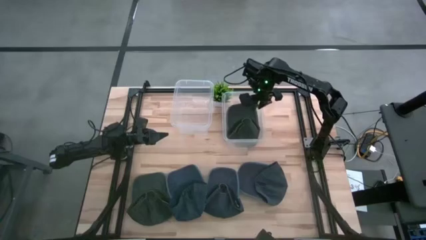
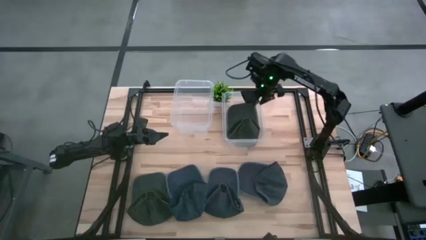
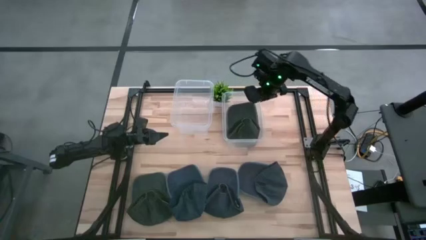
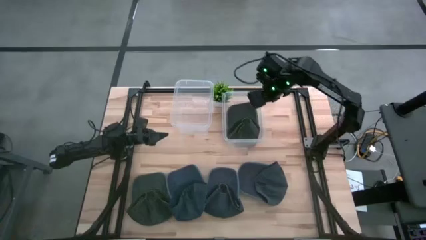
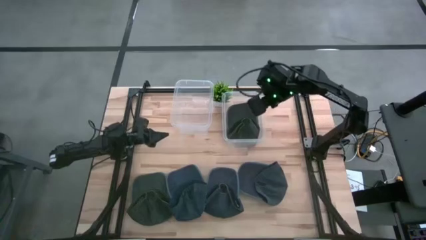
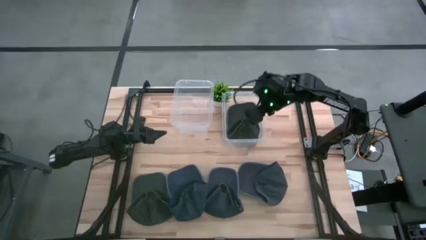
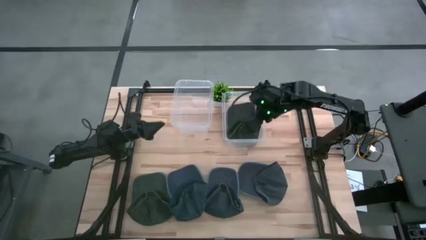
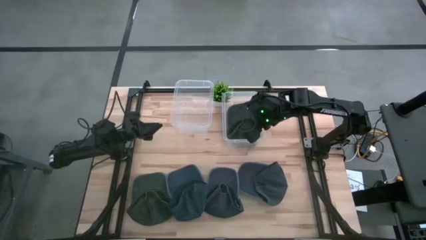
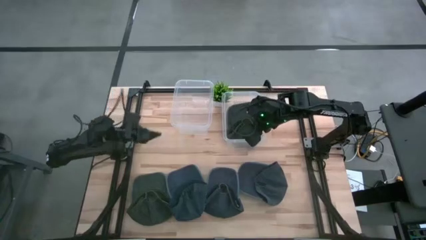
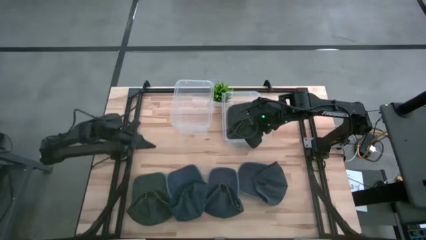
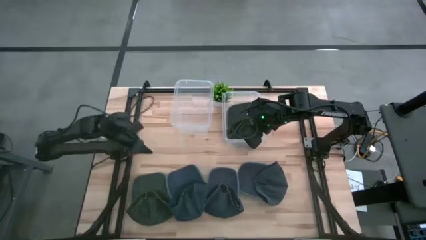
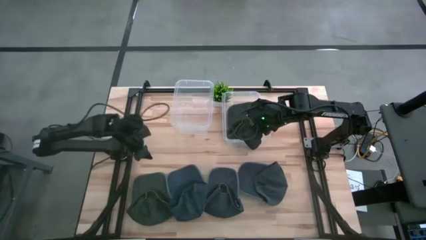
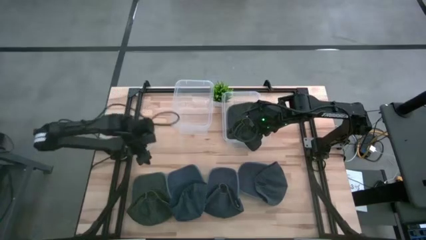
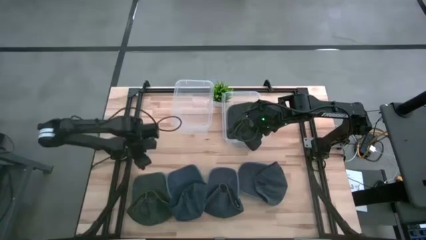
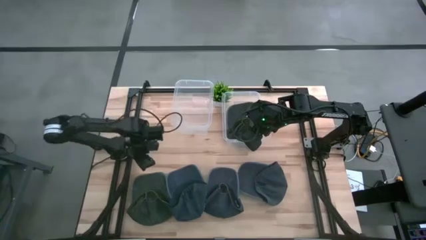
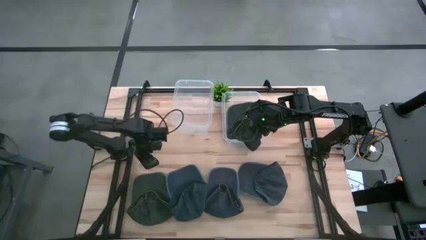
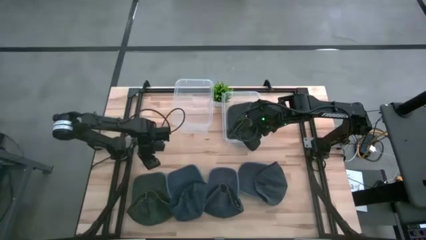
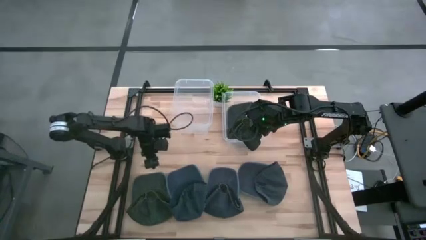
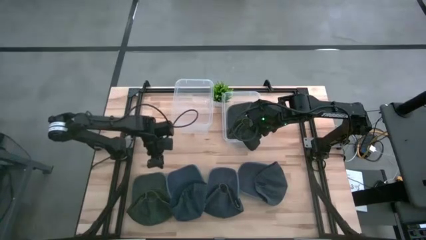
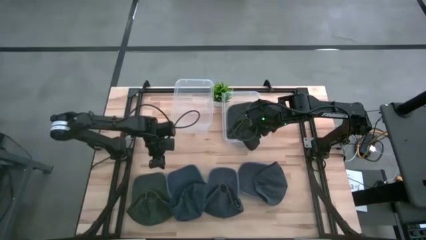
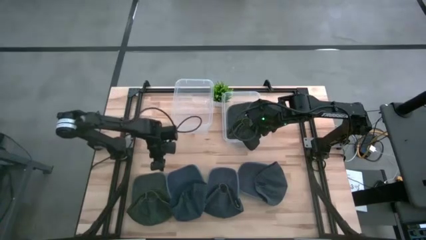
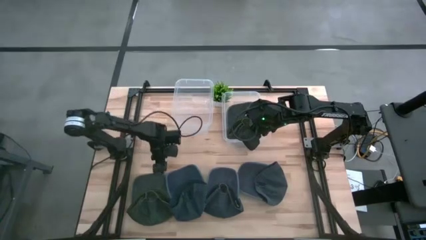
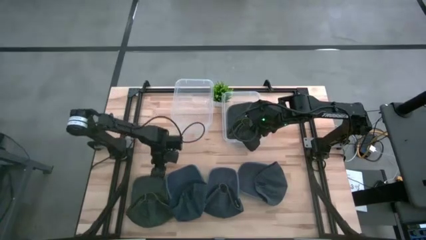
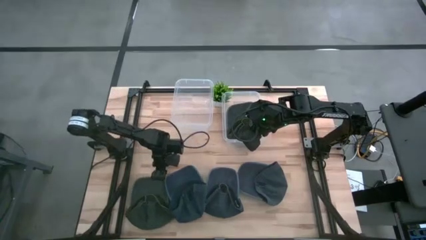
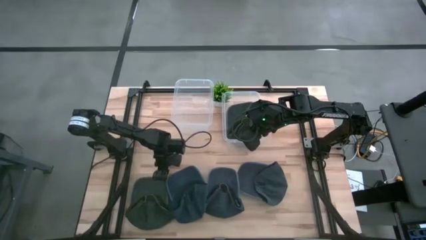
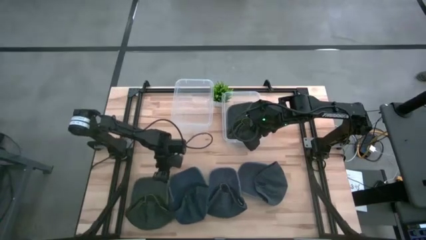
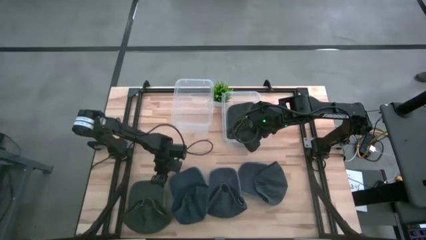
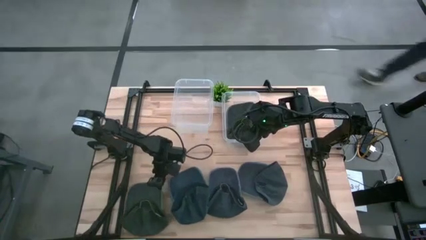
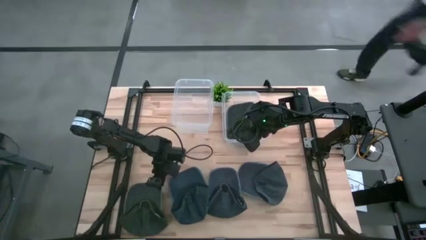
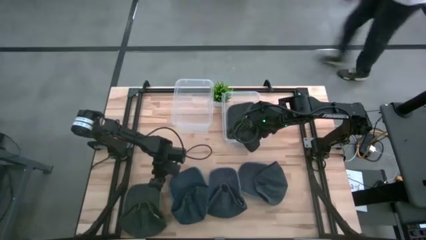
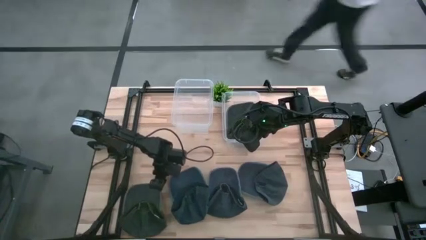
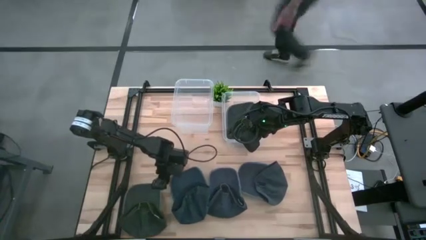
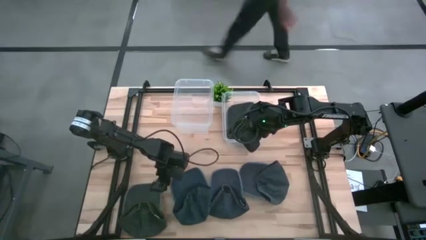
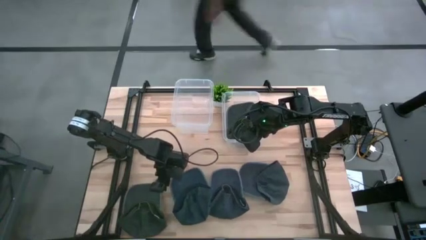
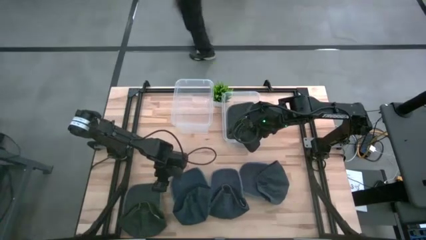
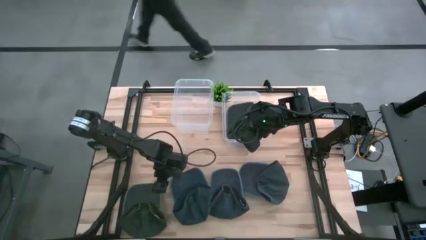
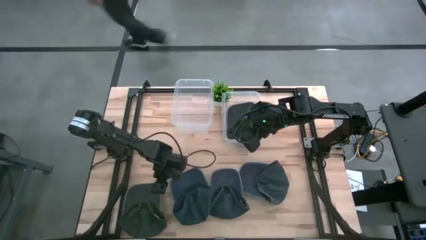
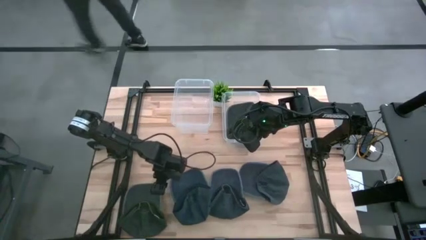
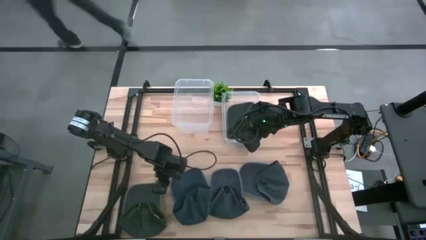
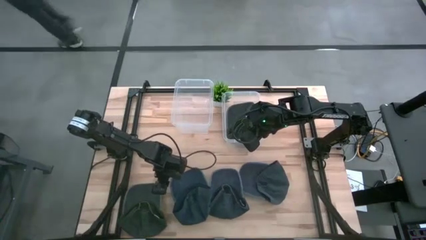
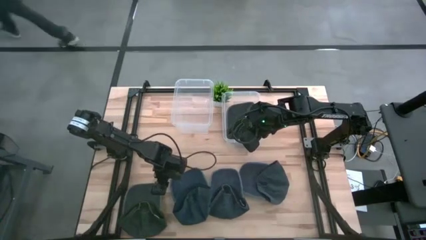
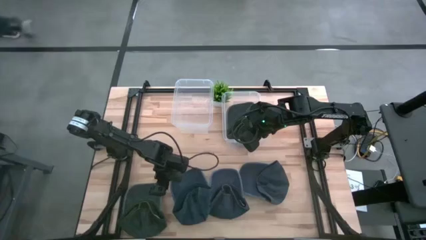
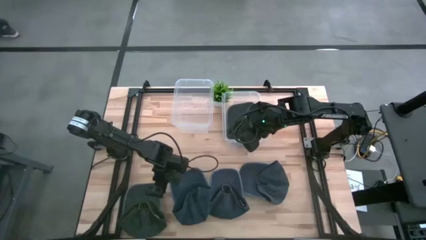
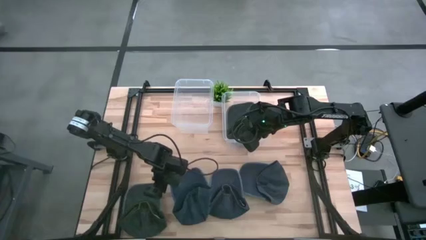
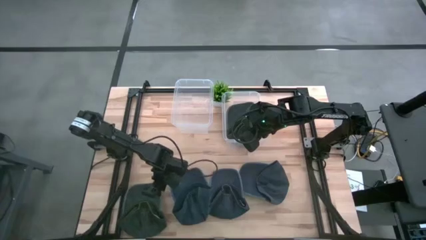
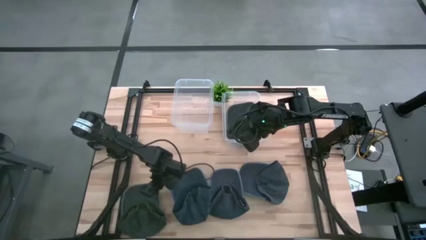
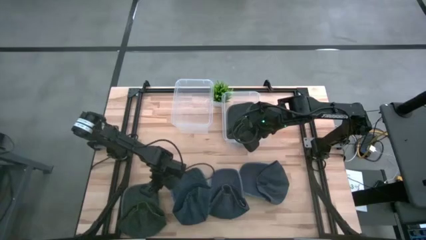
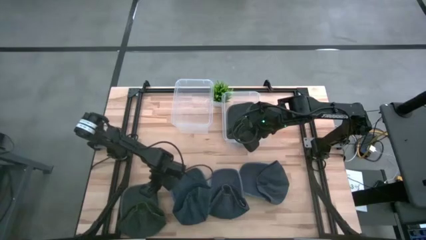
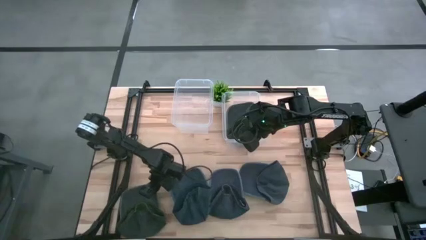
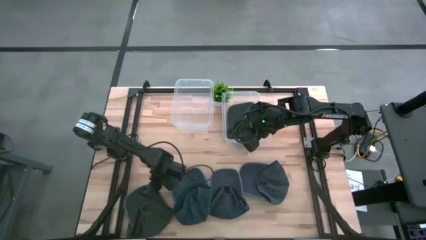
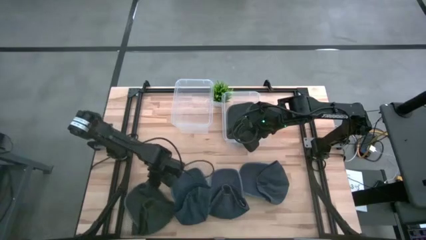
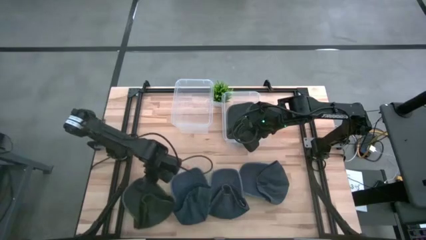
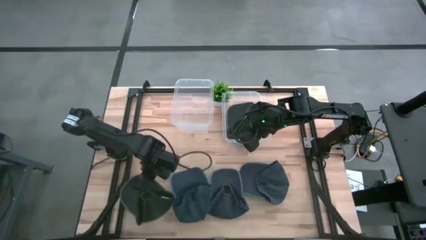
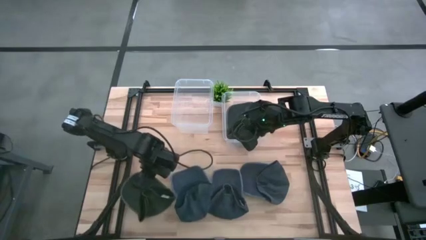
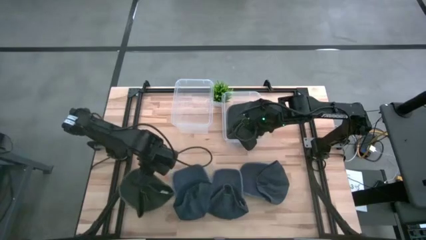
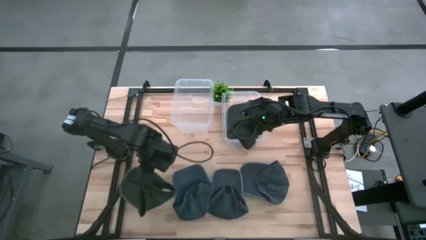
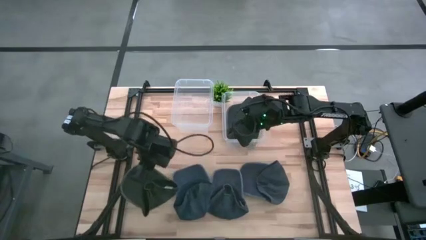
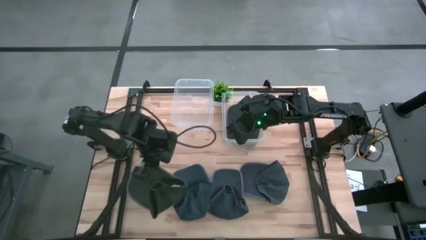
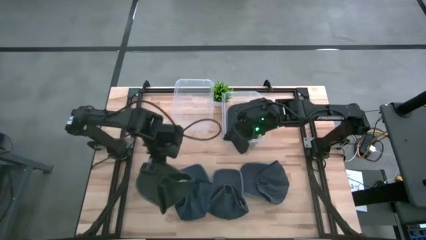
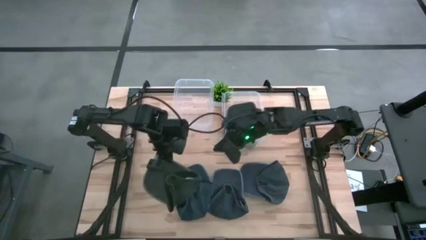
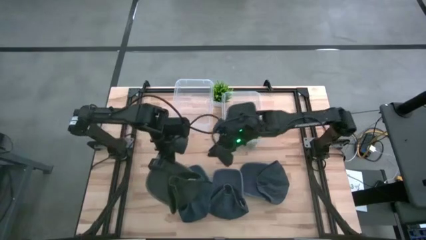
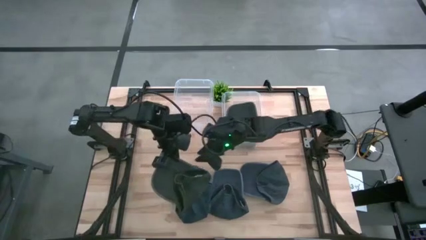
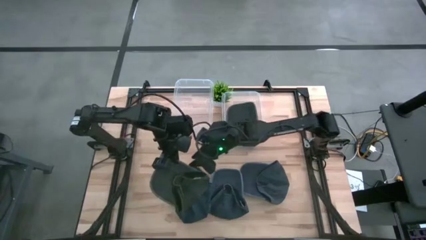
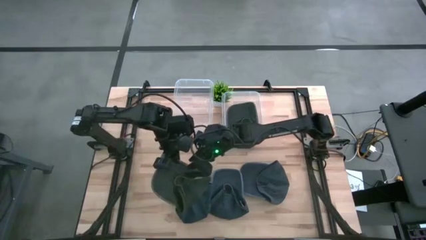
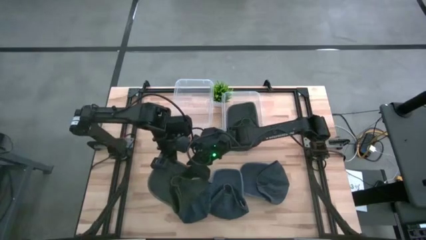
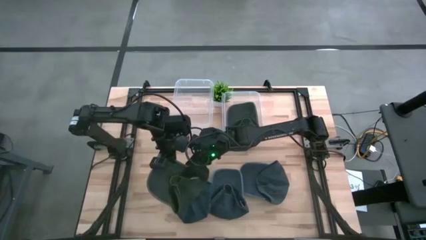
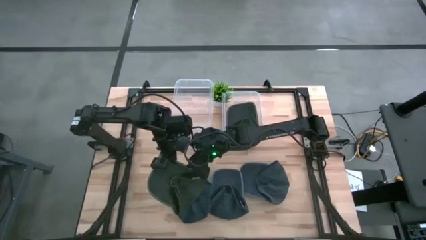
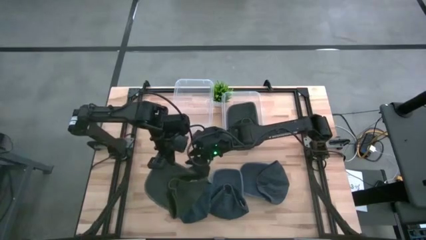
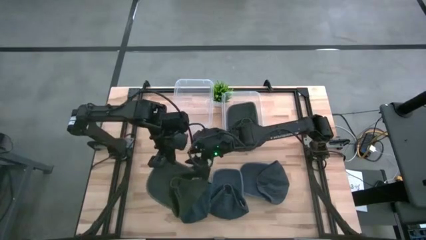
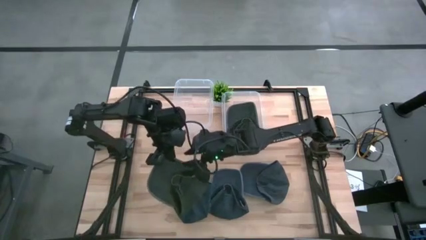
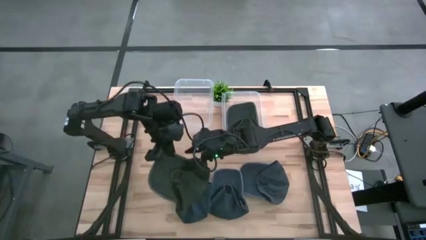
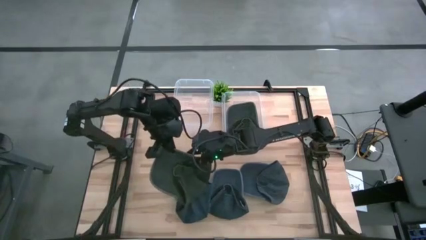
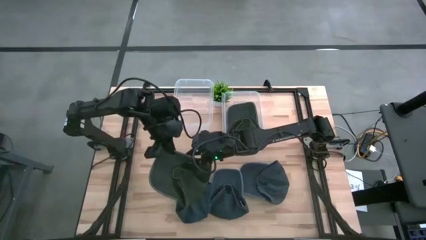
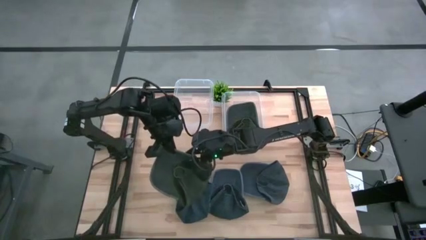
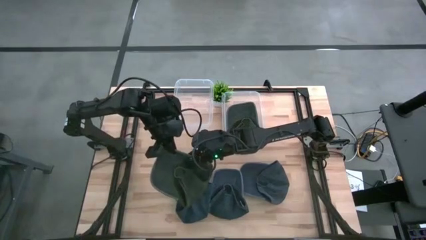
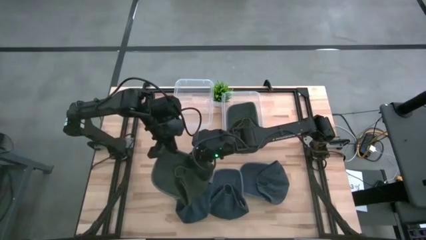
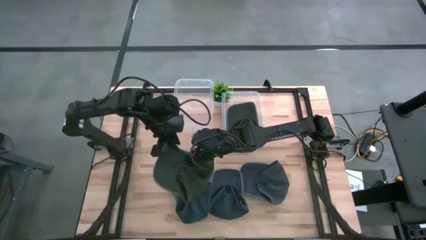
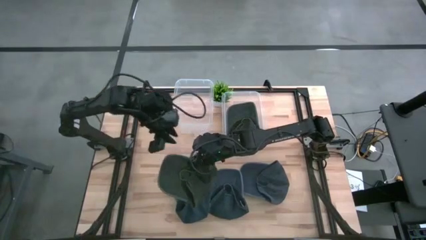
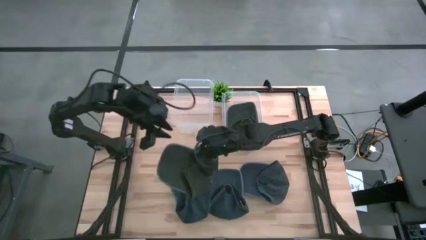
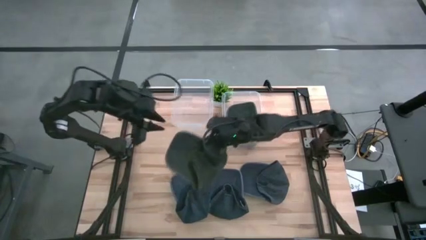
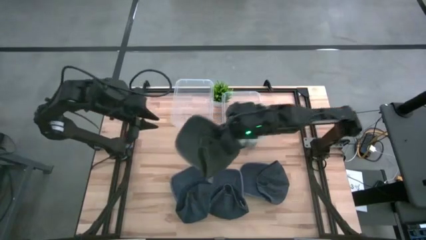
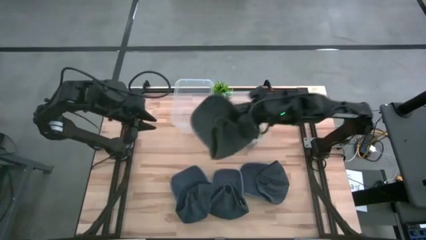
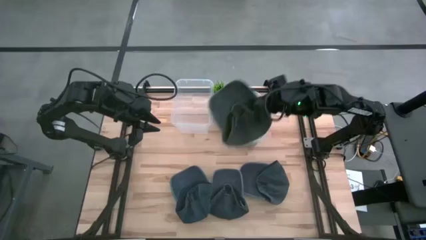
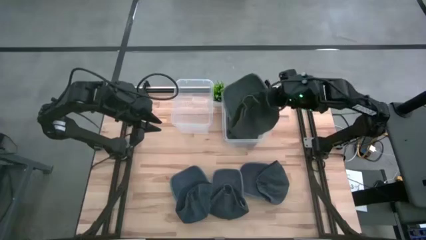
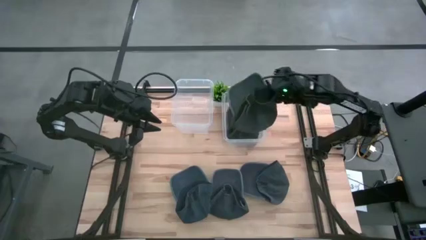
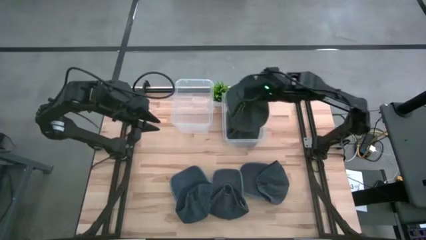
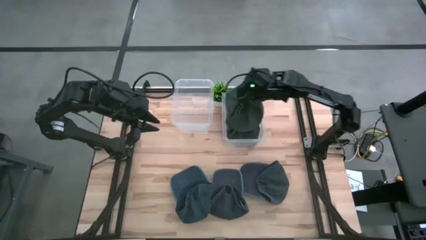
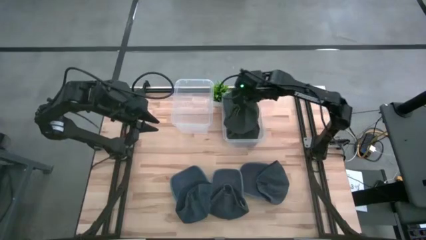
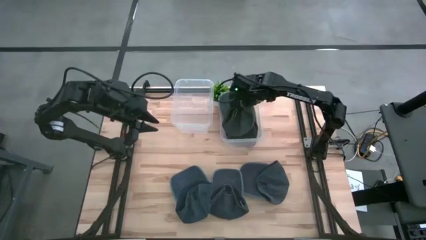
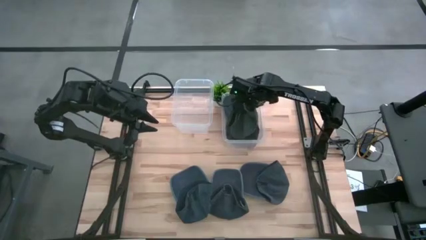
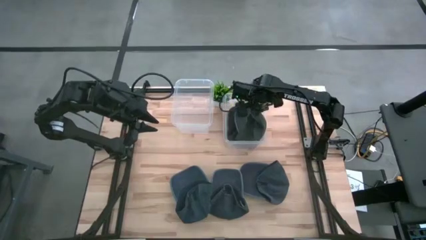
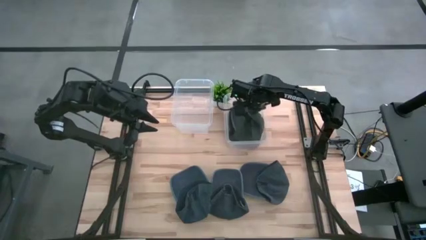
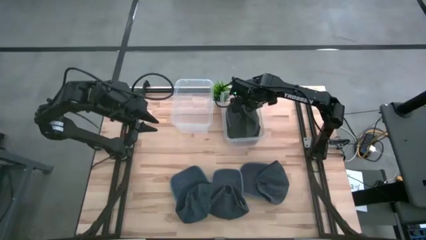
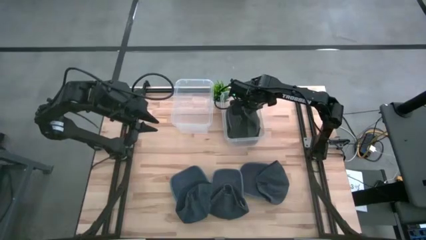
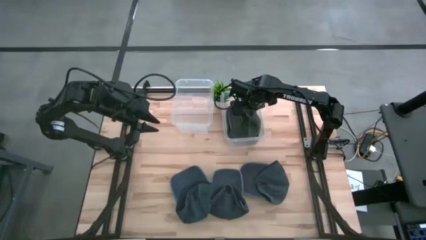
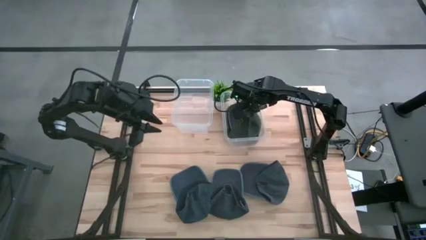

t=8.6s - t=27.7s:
Task: Pick & Place hat
Put the black cap into the right transparent bin
